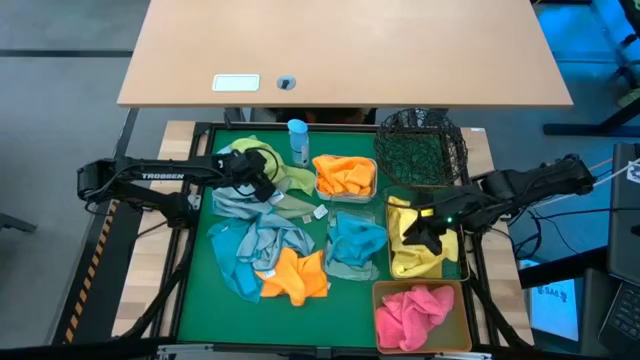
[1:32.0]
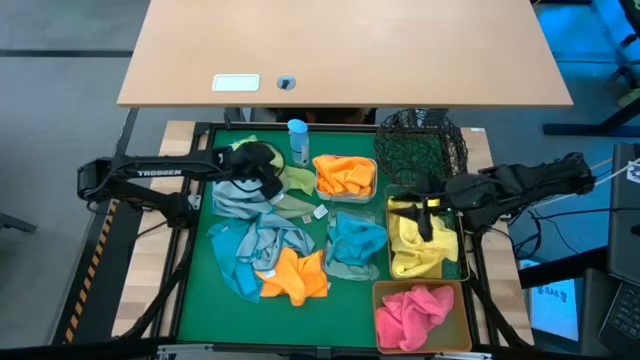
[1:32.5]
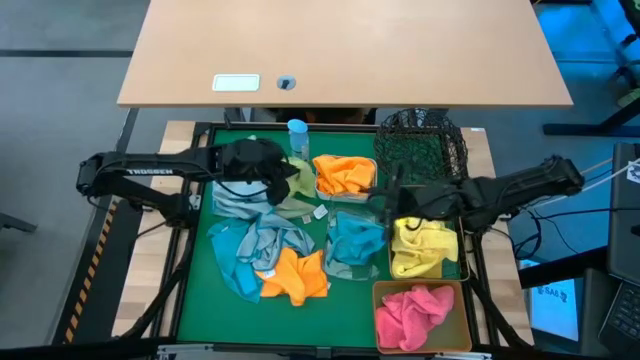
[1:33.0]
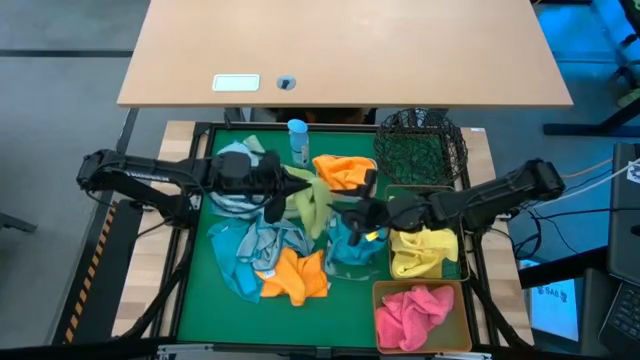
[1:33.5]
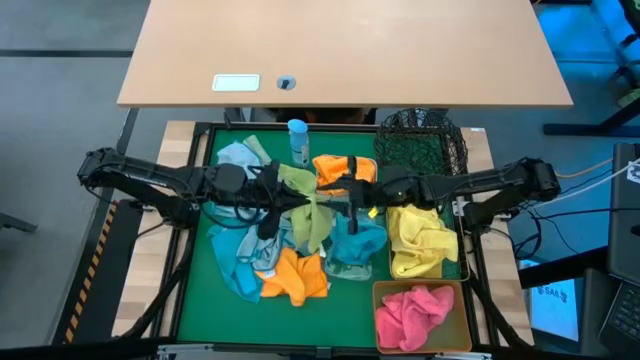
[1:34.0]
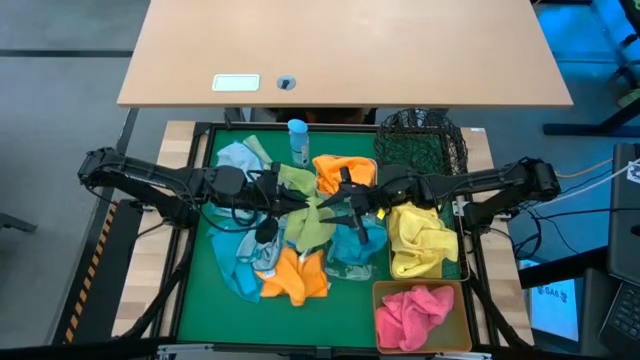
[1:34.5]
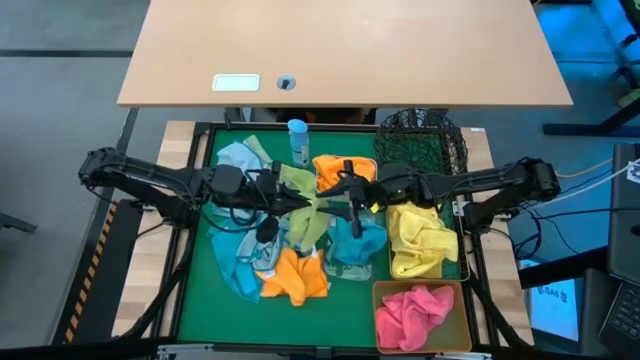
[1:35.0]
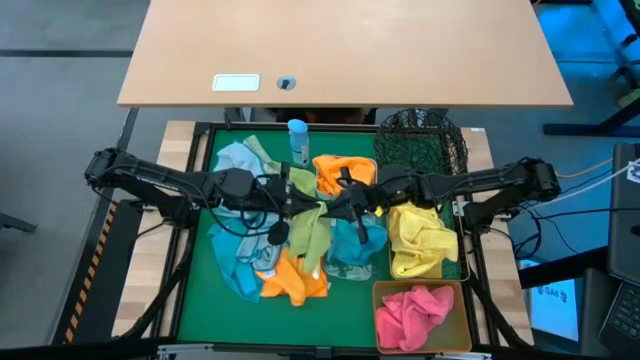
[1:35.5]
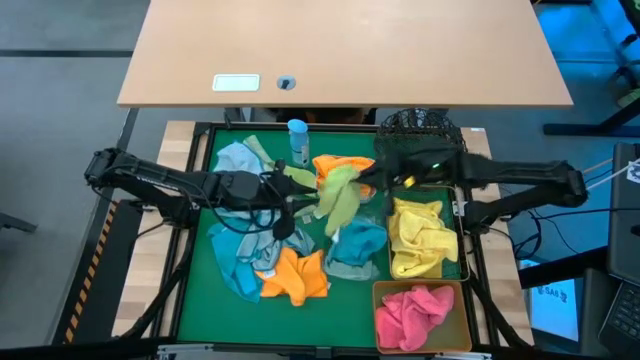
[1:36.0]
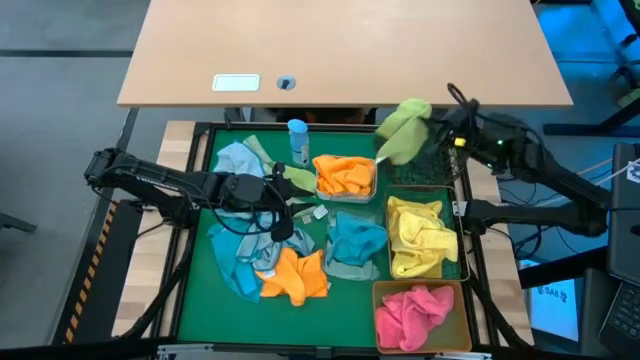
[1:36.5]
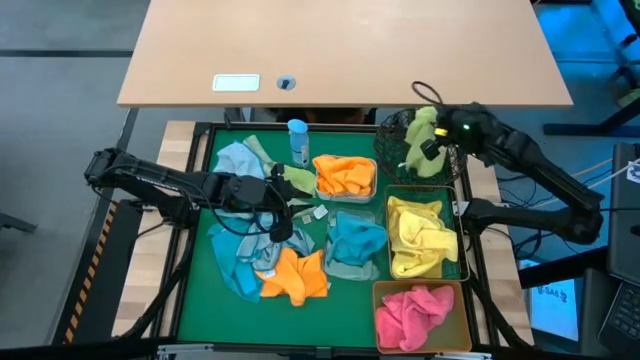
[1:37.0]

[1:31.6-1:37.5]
Task: Sort microfiber towel by color & place in baskets
Put the green towel into the black woven basket

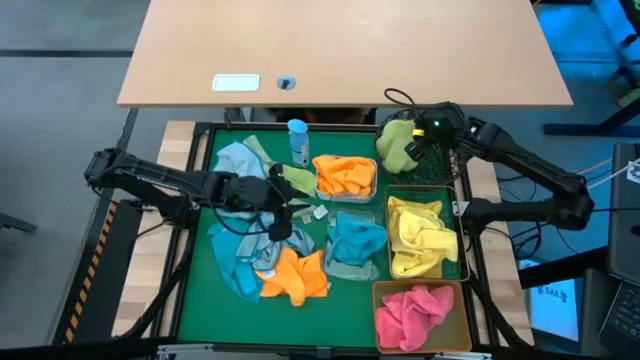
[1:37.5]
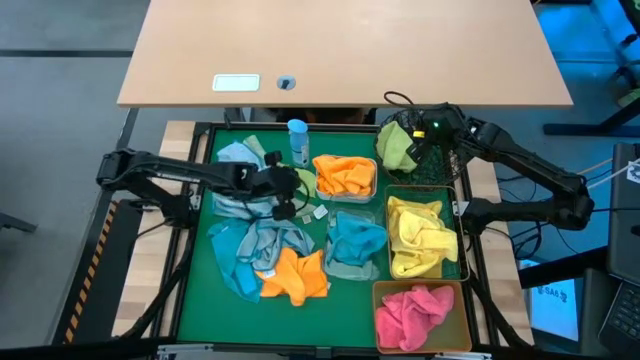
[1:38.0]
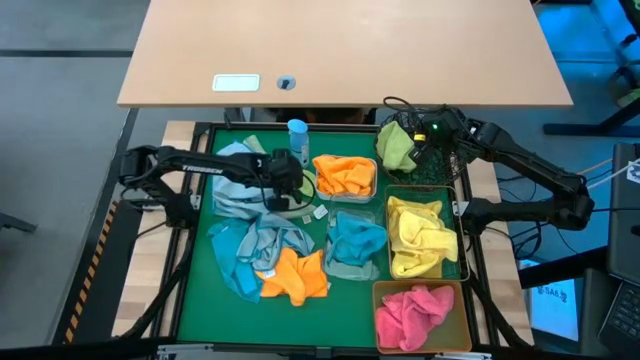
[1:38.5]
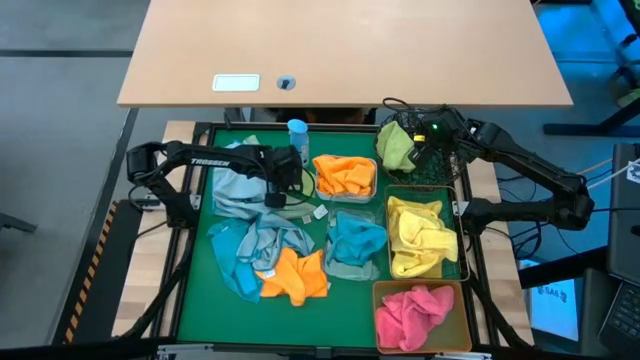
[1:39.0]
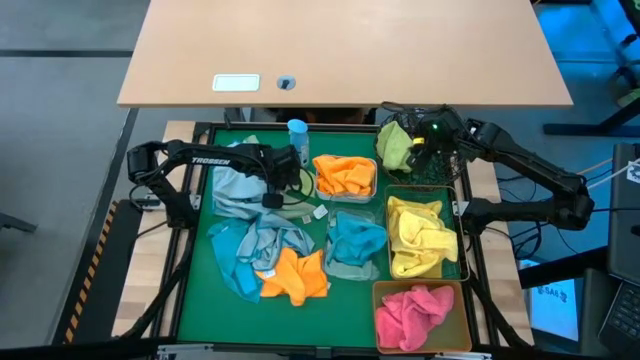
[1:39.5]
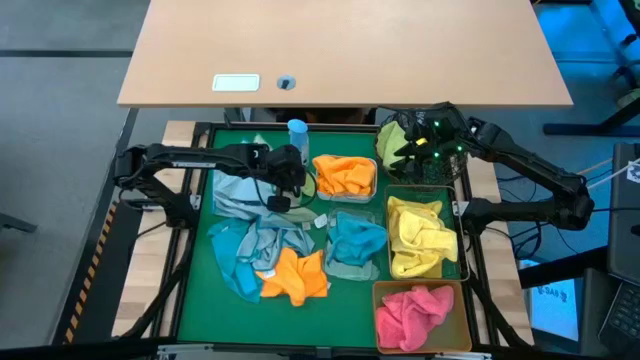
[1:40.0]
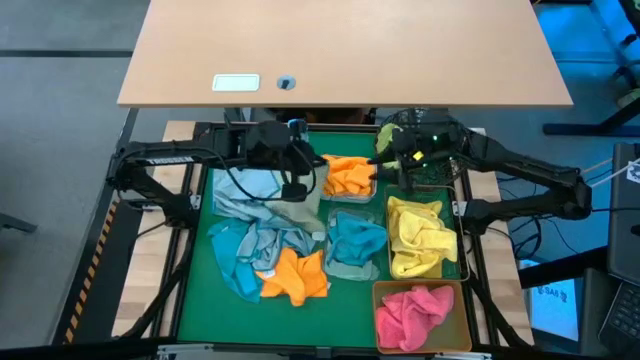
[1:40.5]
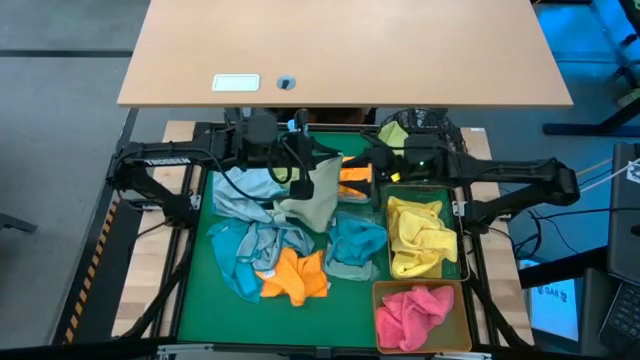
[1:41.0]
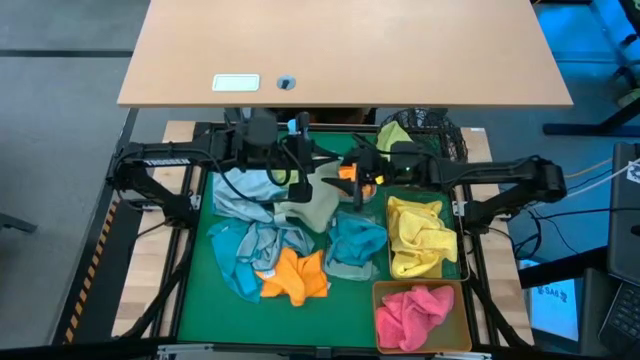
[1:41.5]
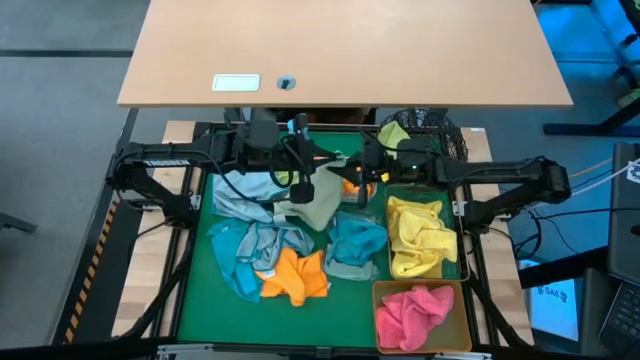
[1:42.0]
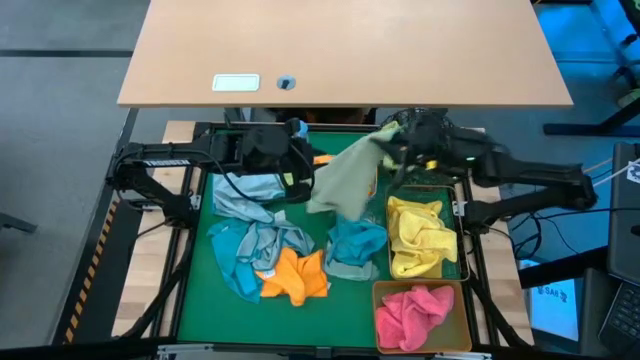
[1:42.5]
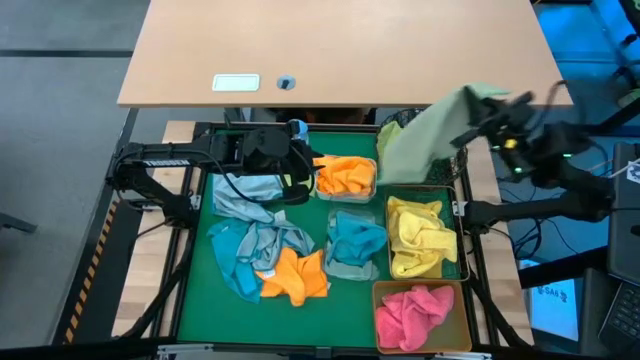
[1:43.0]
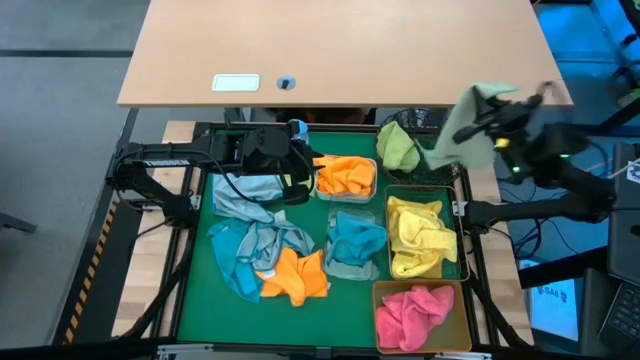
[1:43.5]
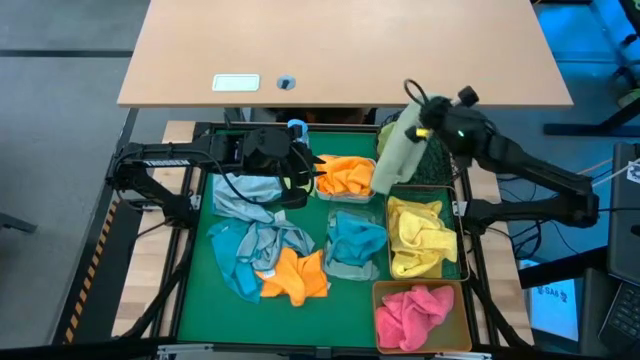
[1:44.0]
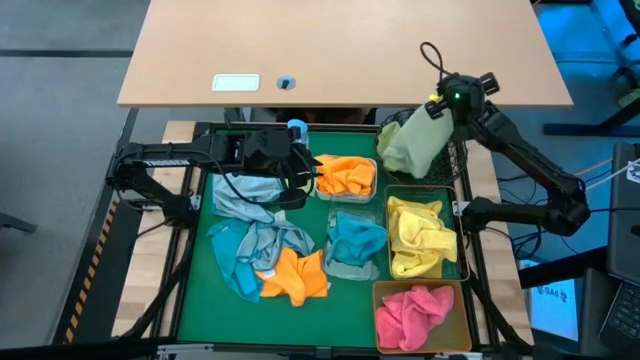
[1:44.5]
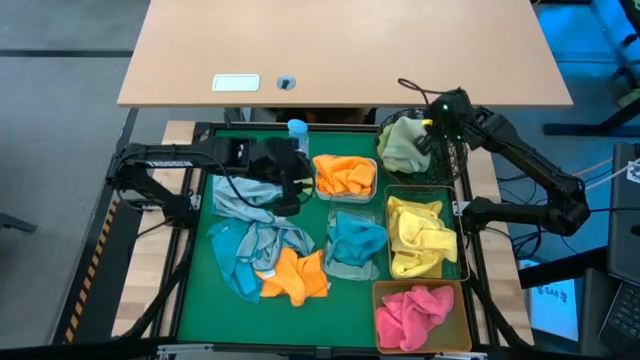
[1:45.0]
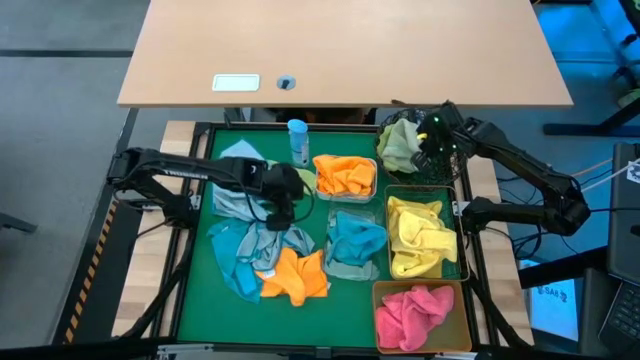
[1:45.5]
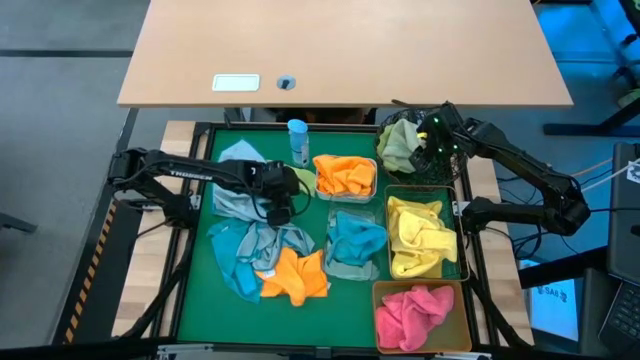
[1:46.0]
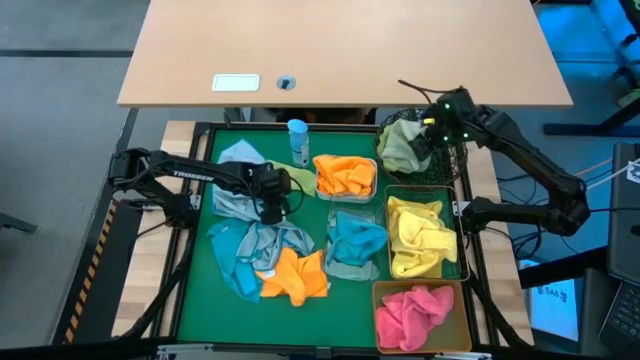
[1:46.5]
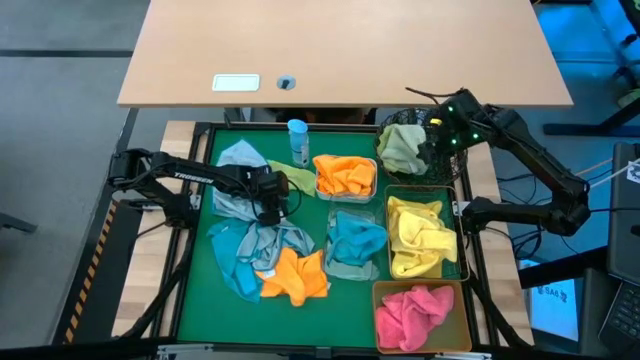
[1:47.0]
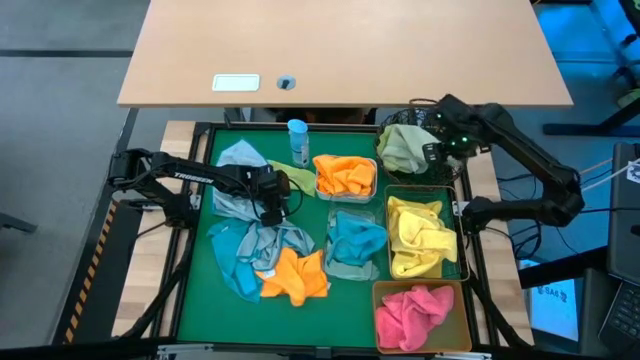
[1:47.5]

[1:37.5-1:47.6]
Put the light green towel into the black woven basket

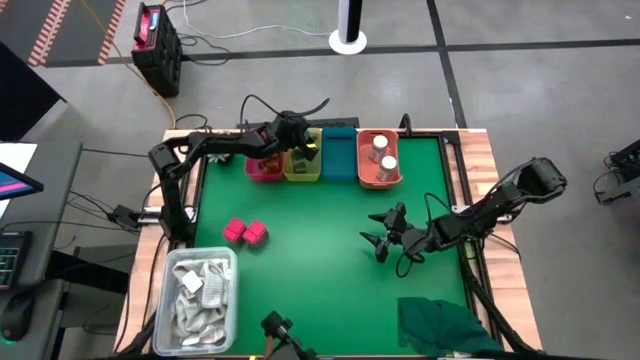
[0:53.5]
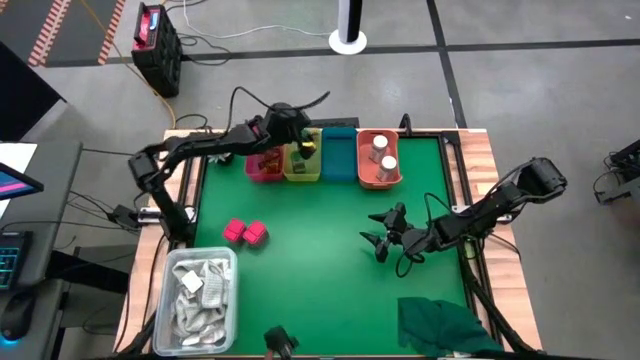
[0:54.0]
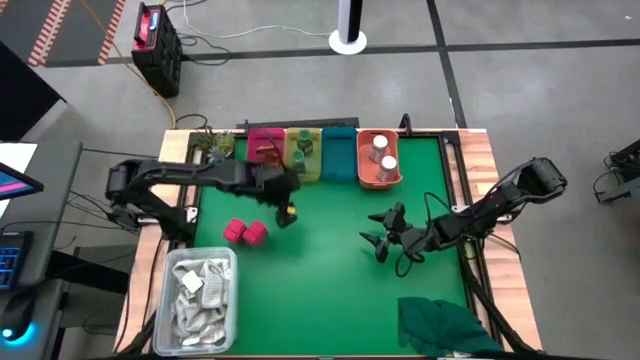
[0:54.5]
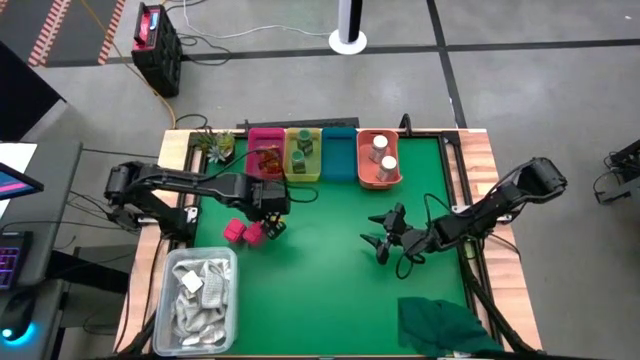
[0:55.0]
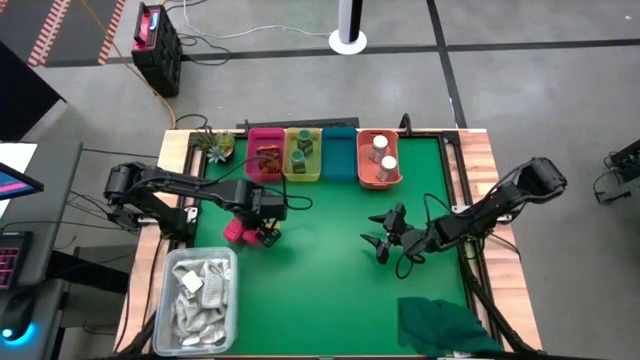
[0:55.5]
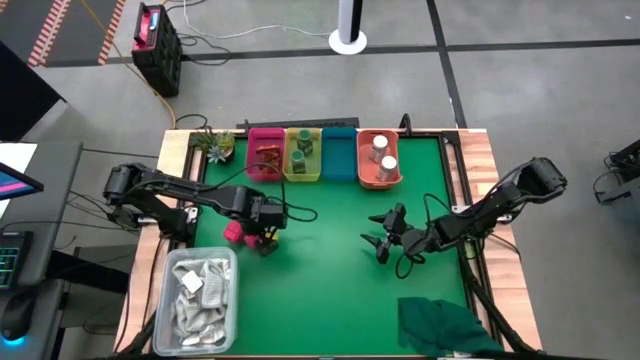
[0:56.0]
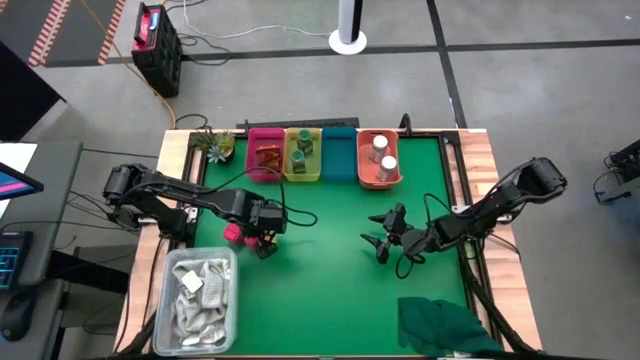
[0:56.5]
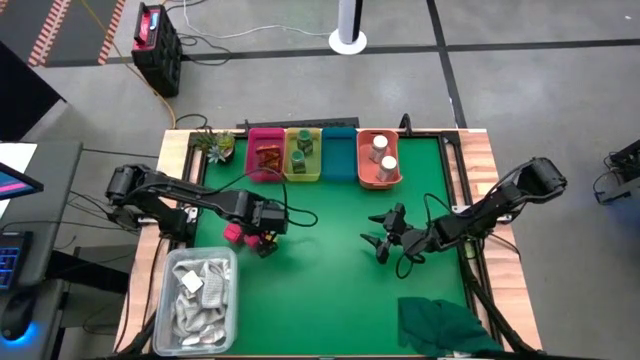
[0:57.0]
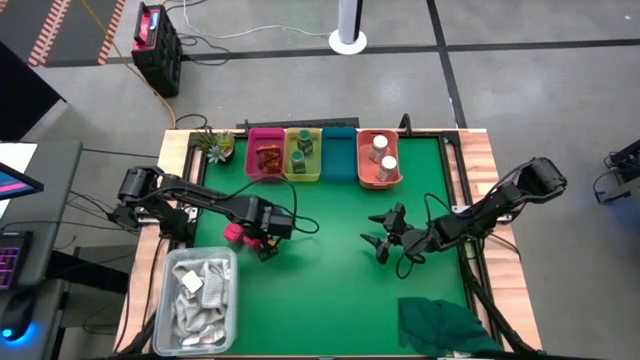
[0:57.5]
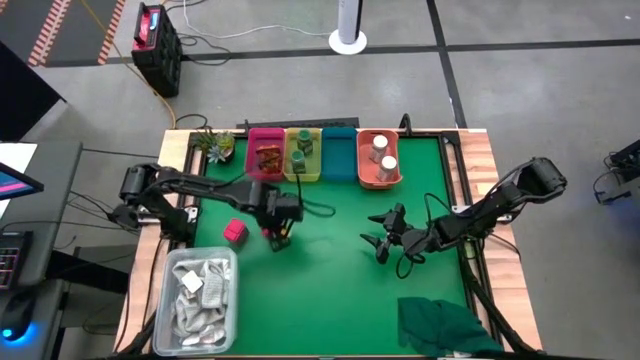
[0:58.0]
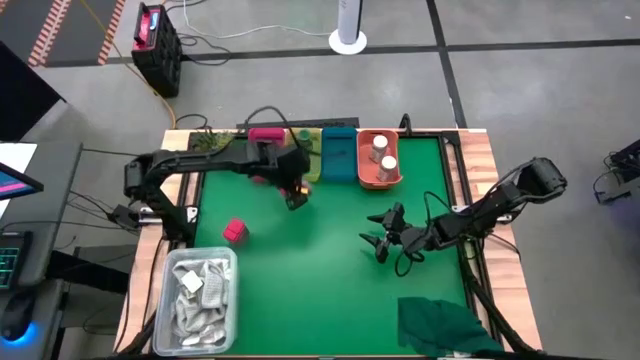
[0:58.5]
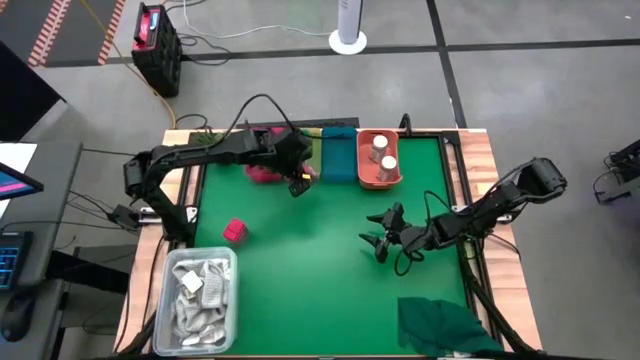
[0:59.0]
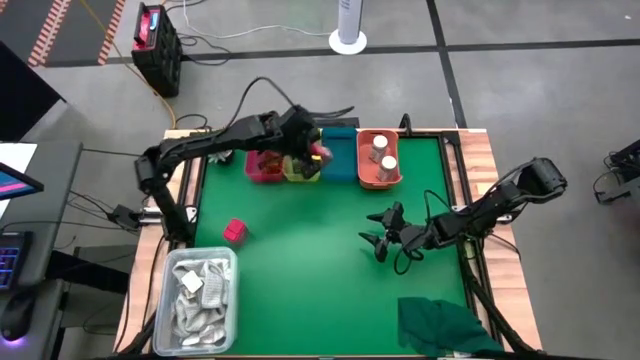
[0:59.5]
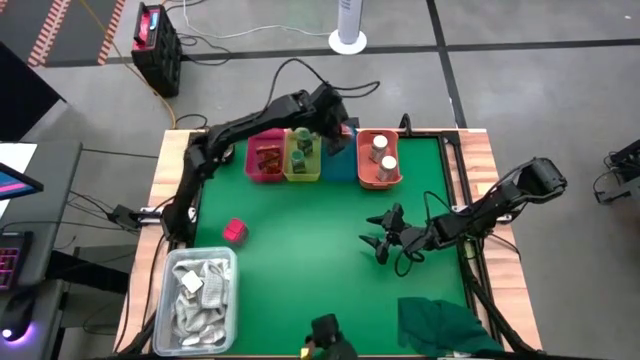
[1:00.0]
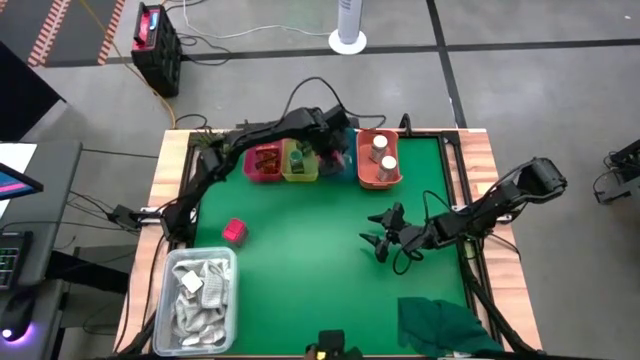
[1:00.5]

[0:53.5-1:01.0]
Task: Sort spices by type
Put the right red lid seasoning can into the blue bin
